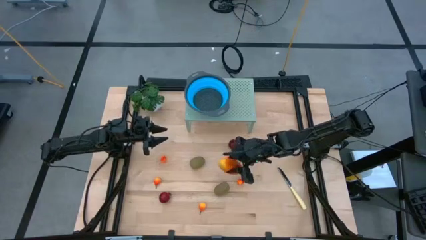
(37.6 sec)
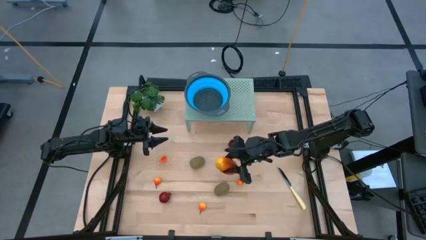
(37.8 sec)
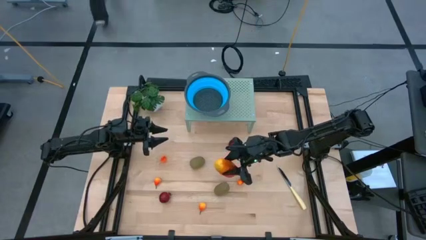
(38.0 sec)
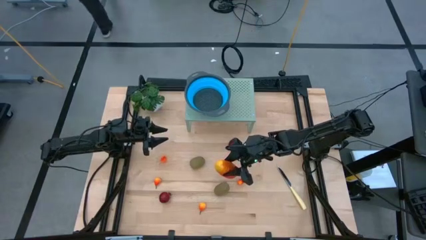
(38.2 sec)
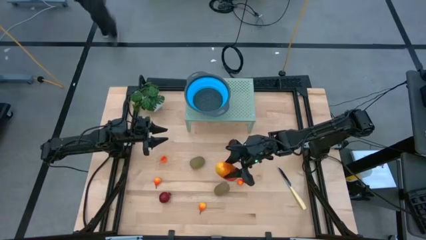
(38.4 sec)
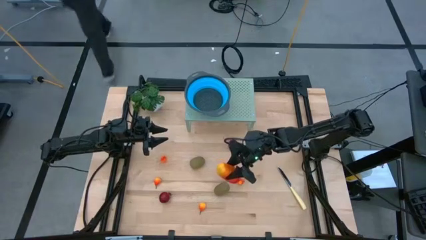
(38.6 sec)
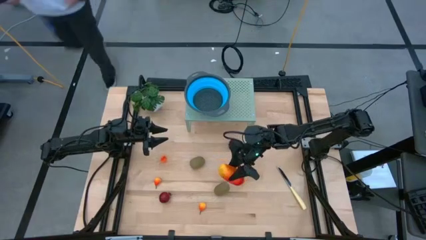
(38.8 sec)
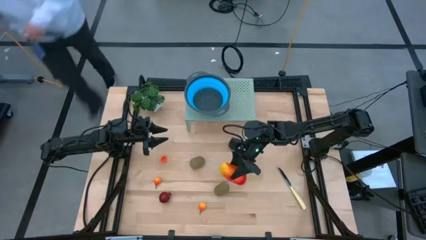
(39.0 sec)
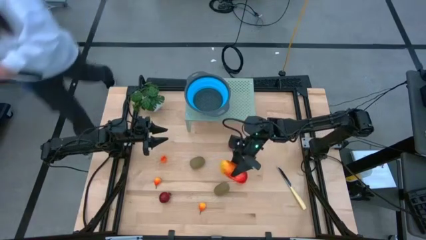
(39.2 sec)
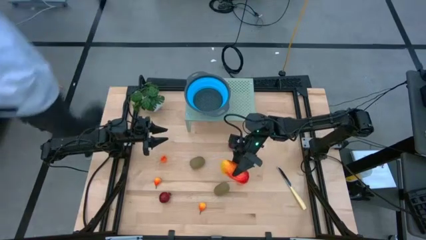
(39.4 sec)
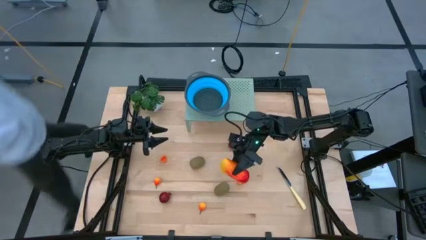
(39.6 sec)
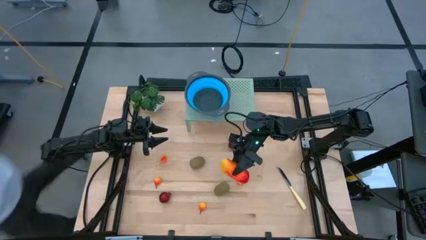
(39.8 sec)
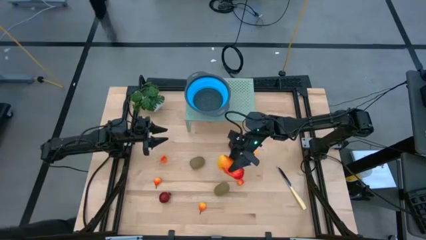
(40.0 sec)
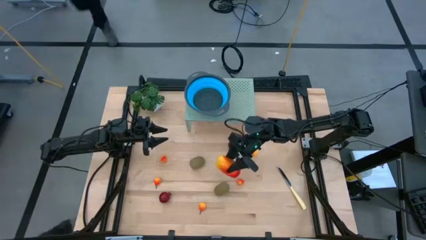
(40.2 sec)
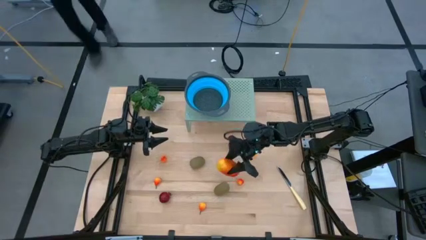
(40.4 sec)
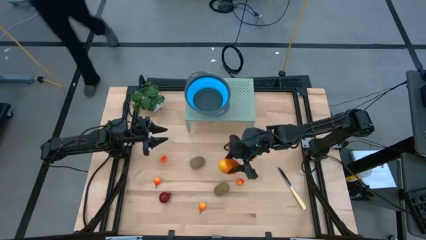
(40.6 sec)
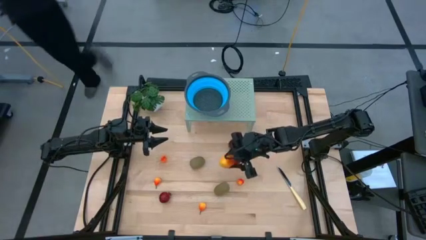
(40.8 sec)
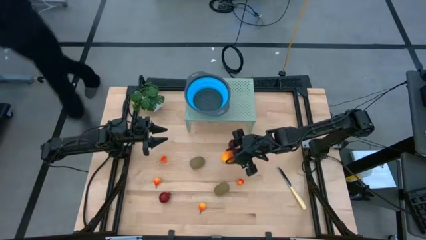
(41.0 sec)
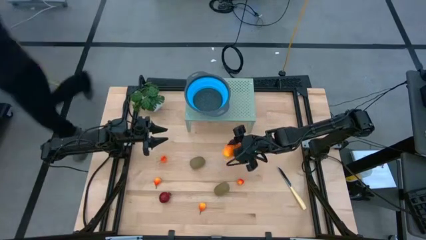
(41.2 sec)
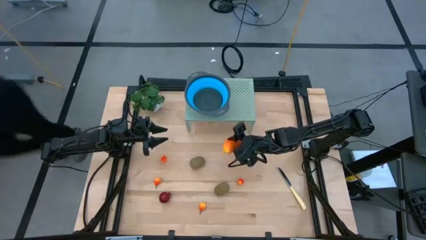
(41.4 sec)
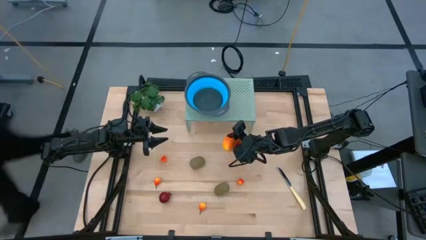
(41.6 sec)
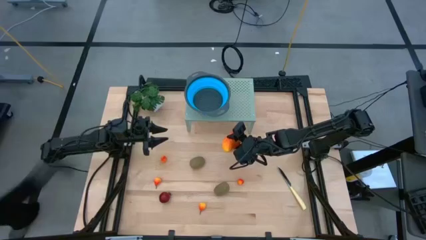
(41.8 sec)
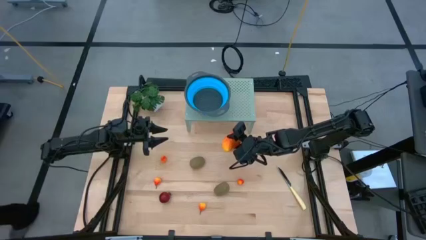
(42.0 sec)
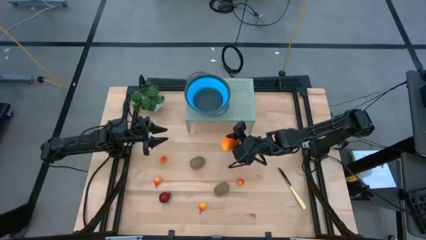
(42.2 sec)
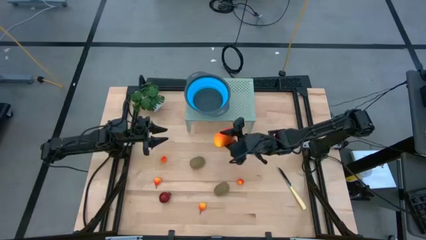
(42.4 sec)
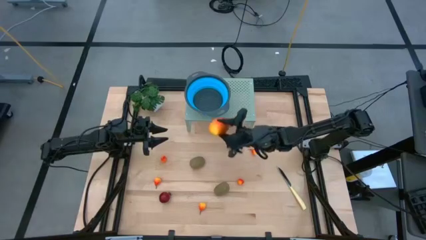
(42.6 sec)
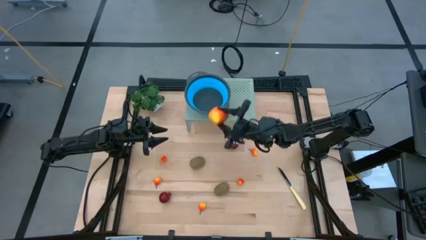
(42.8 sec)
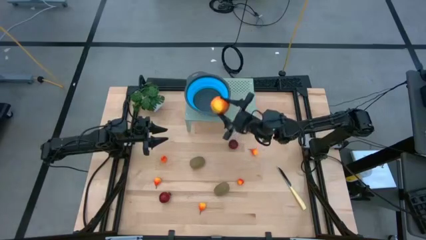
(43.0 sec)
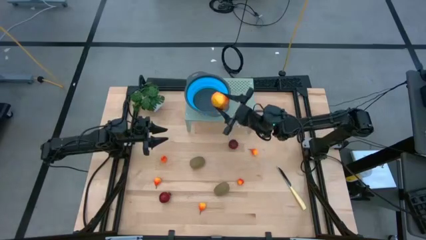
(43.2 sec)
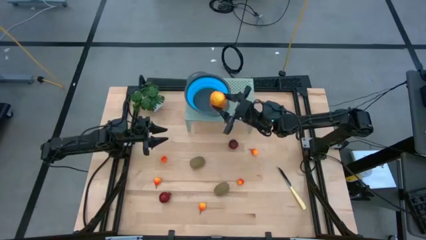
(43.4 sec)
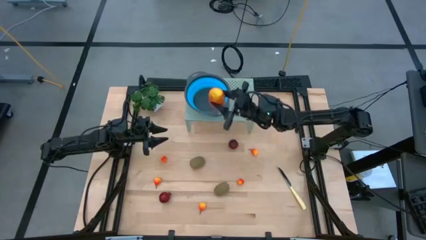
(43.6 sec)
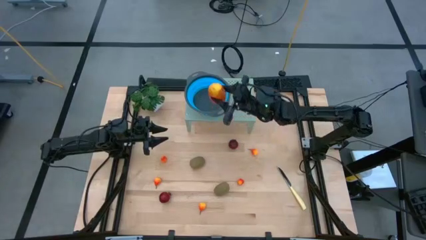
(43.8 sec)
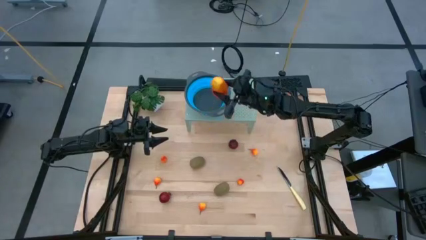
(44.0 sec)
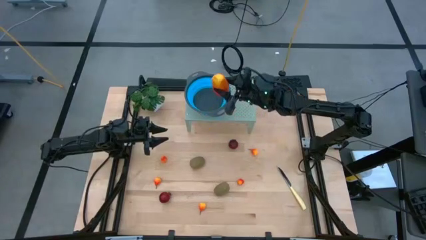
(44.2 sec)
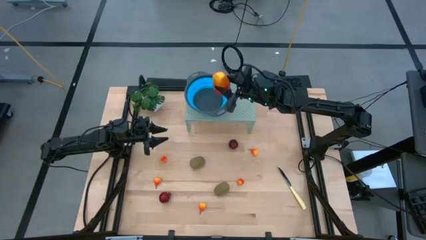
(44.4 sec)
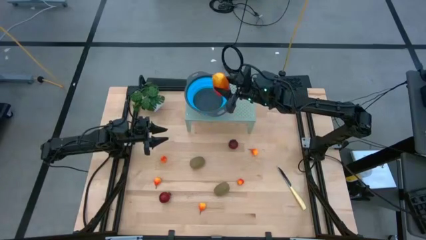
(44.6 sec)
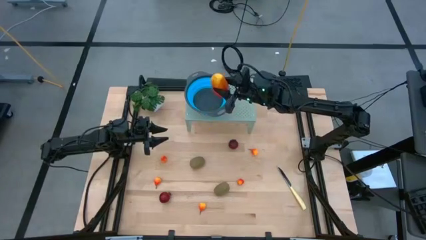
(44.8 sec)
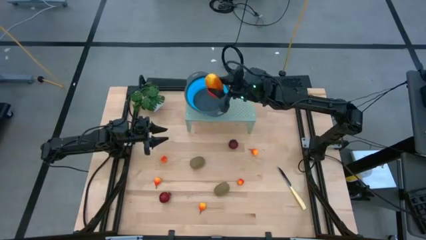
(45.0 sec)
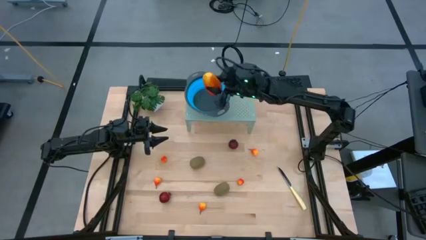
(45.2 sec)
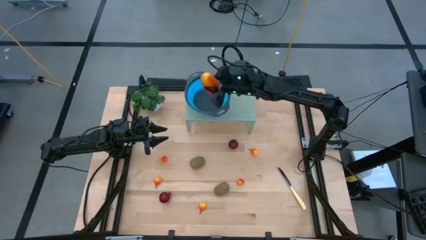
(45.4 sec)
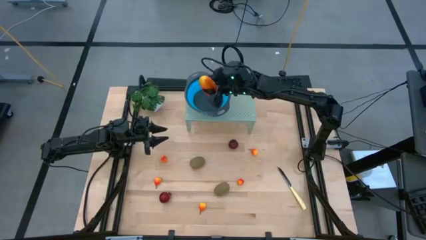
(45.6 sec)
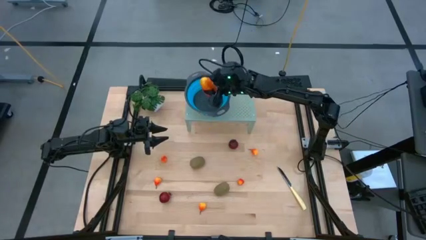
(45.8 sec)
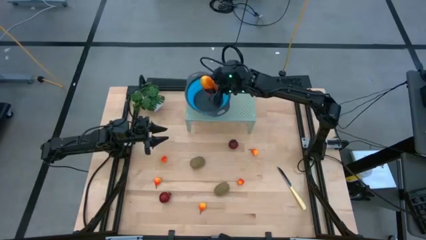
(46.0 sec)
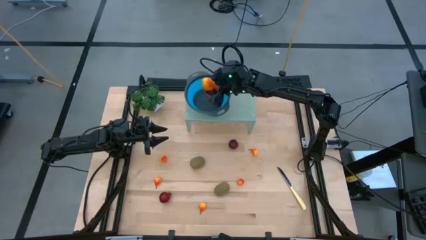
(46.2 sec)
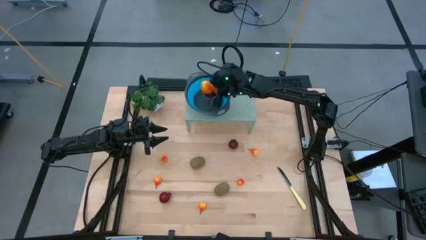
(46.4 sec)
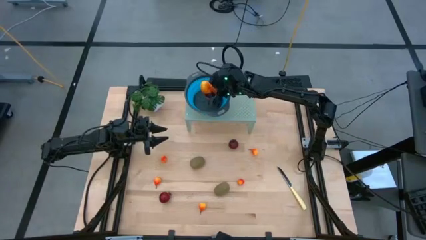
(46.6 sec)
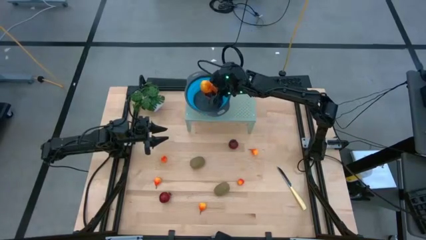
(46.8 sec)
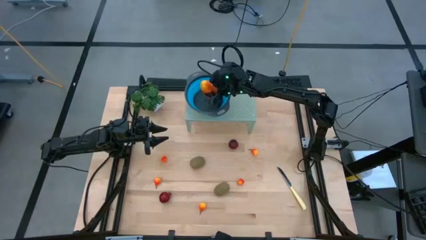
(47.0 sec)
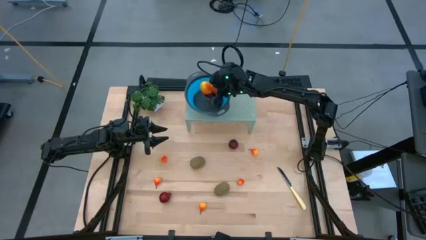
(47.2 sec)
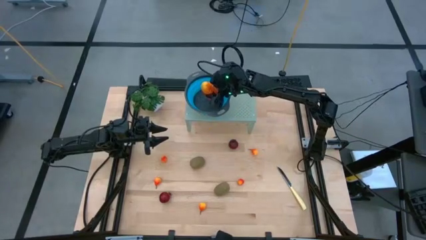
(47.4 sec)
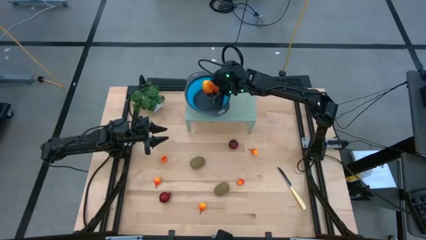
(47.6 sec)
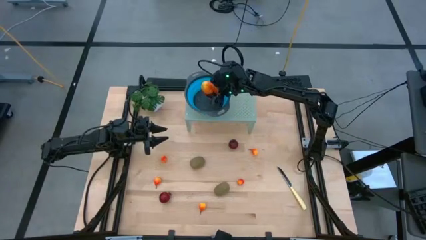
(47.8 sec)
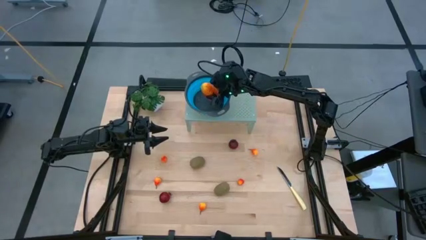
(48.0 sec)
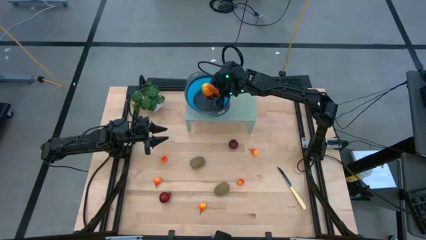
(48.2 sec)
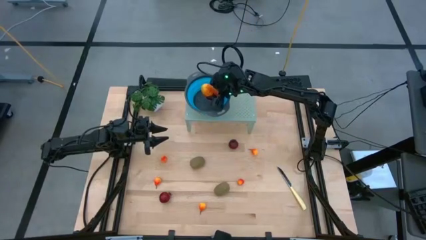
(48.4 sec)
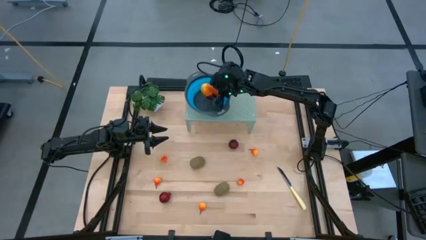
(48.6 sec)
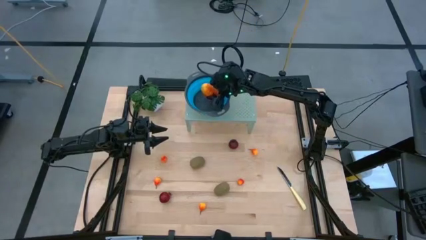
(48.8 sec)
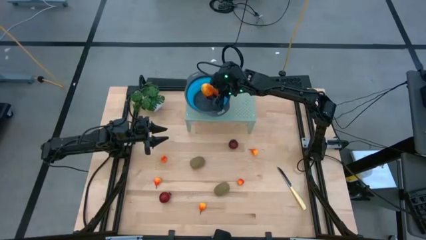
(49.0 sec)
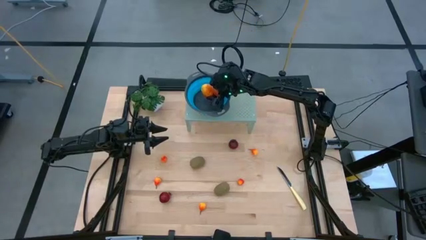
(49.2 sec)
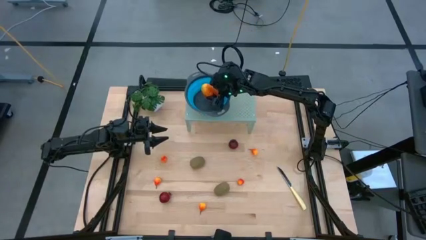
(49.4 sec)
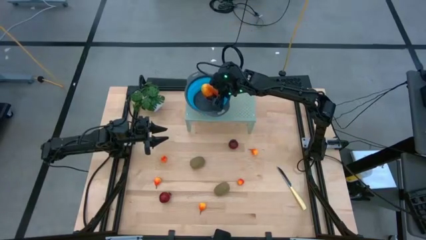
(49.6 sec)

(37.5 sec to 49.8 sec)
Task: Pick & Place Fruit
Put the yellow mango into the blue bowl on the shelf
